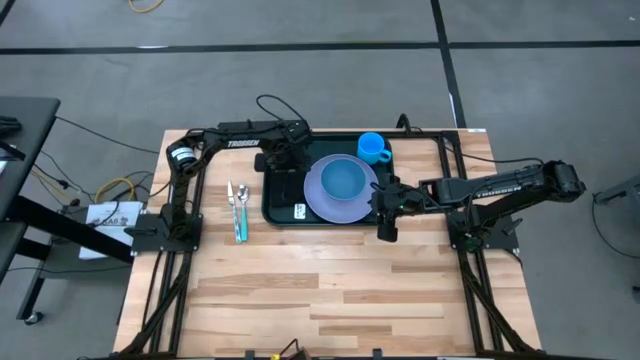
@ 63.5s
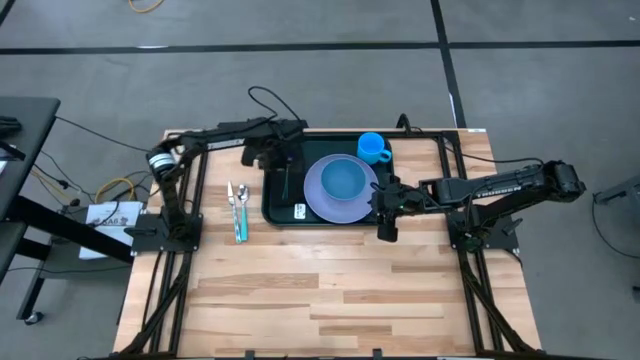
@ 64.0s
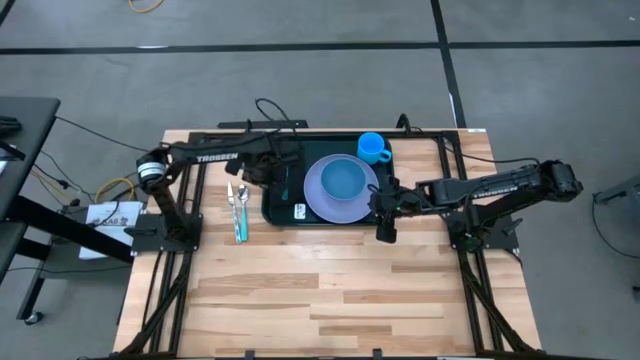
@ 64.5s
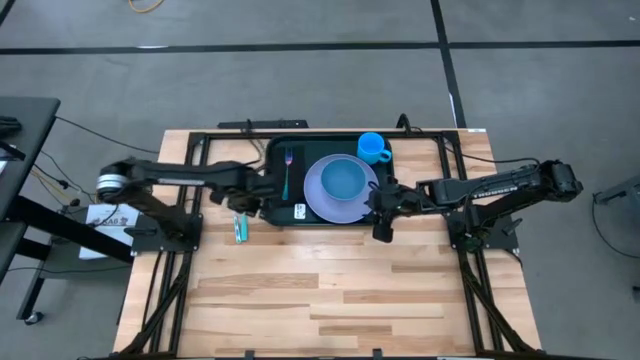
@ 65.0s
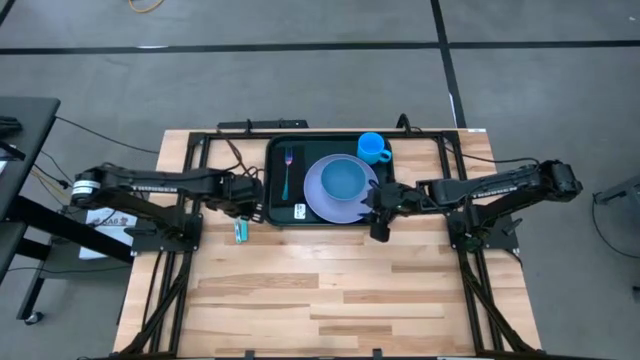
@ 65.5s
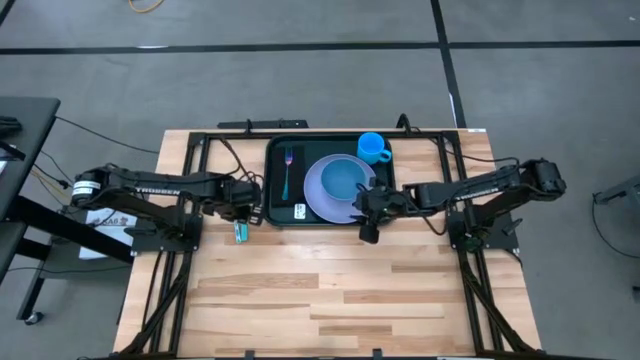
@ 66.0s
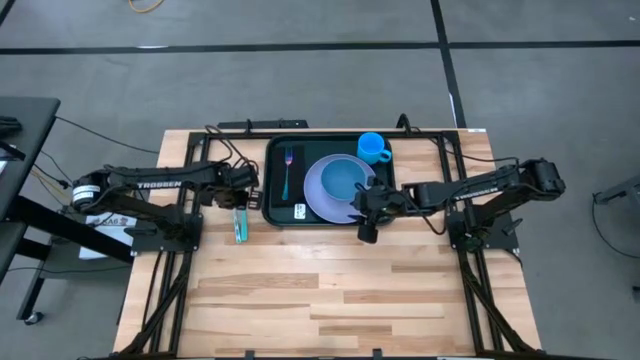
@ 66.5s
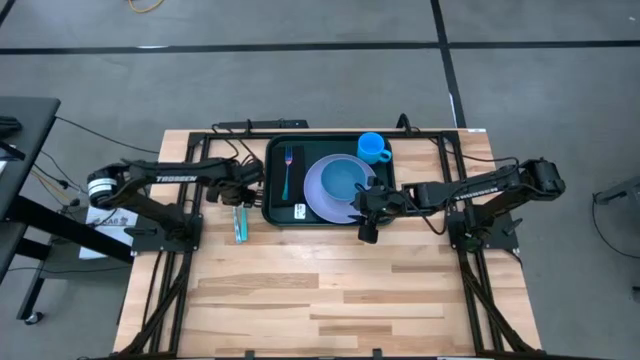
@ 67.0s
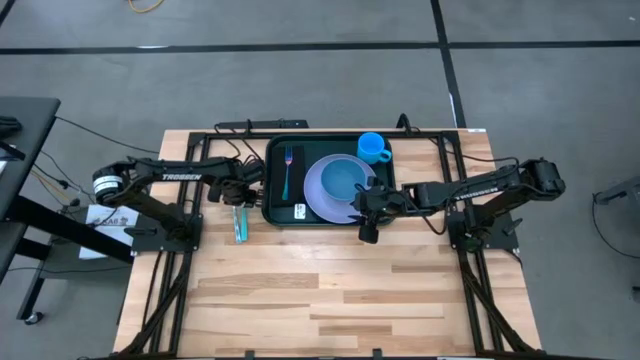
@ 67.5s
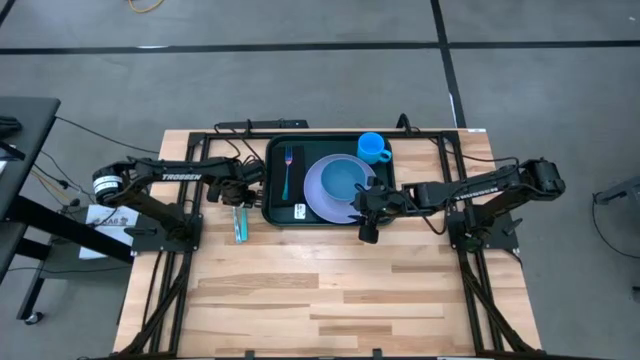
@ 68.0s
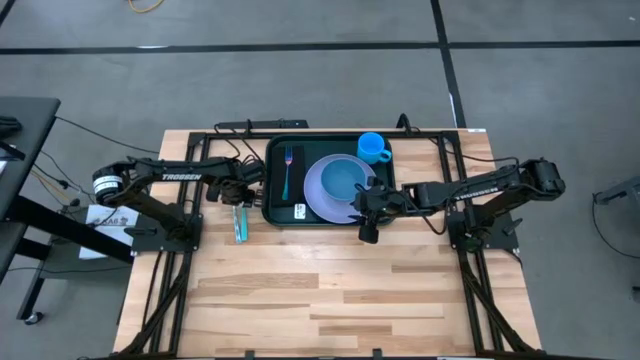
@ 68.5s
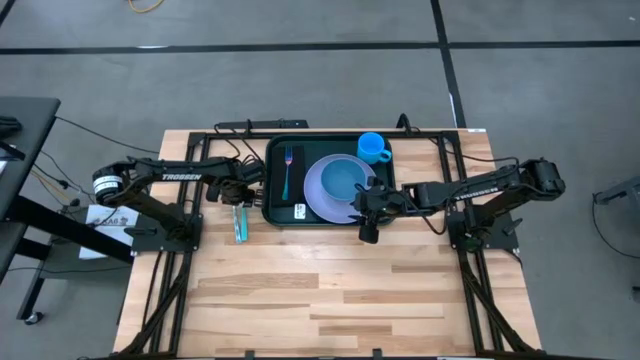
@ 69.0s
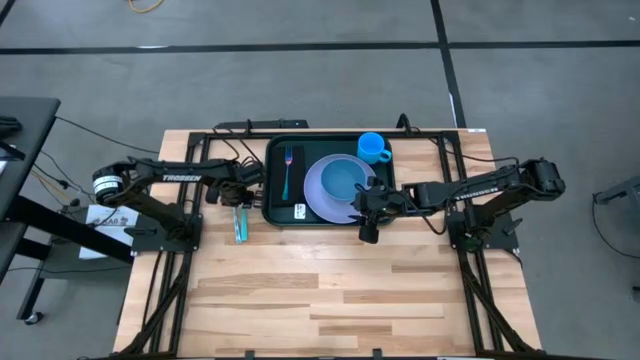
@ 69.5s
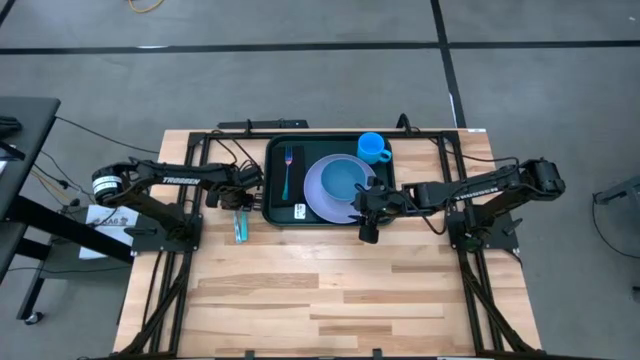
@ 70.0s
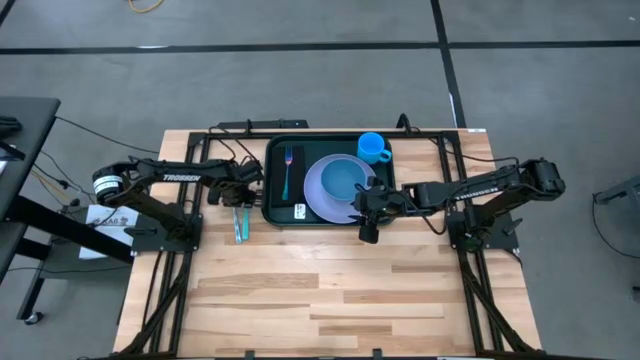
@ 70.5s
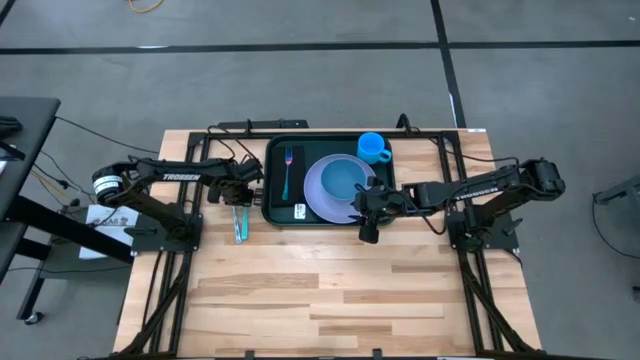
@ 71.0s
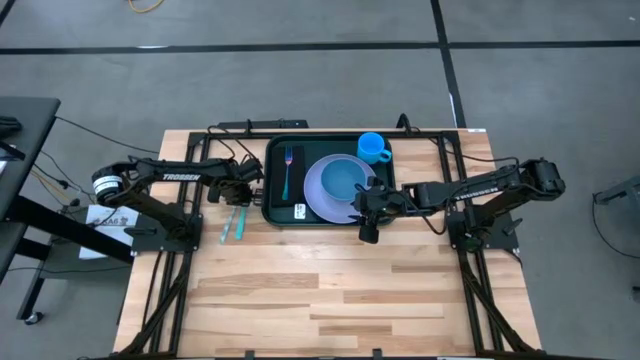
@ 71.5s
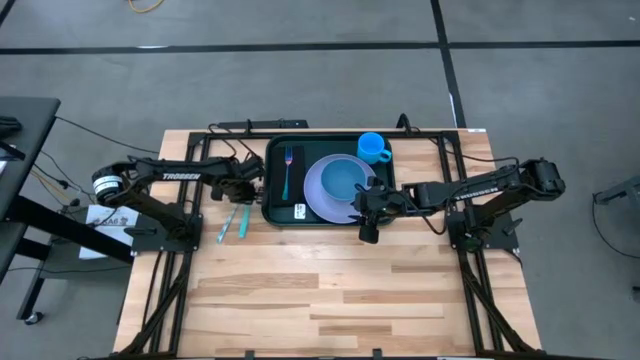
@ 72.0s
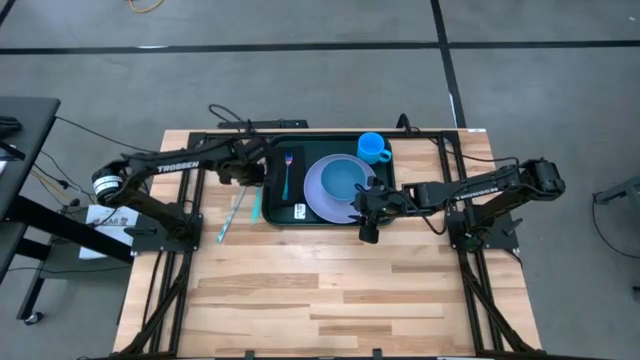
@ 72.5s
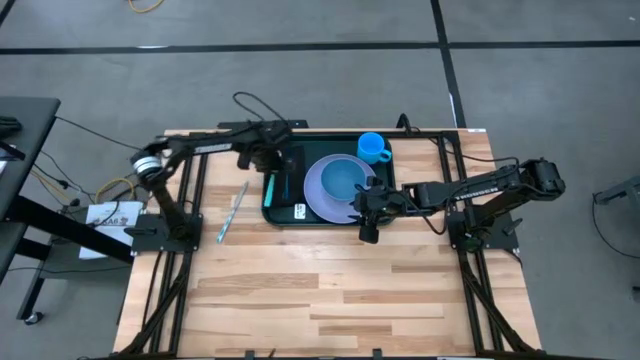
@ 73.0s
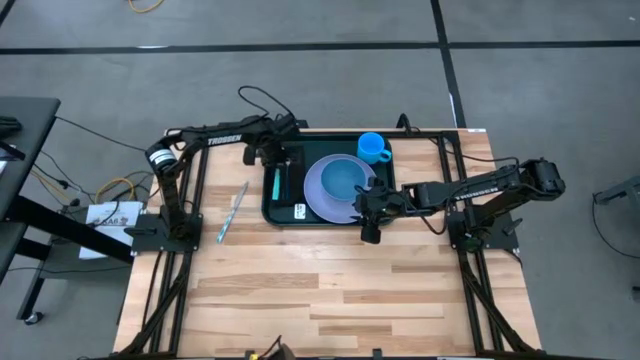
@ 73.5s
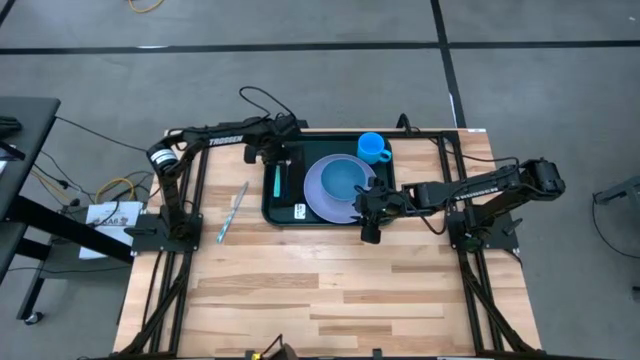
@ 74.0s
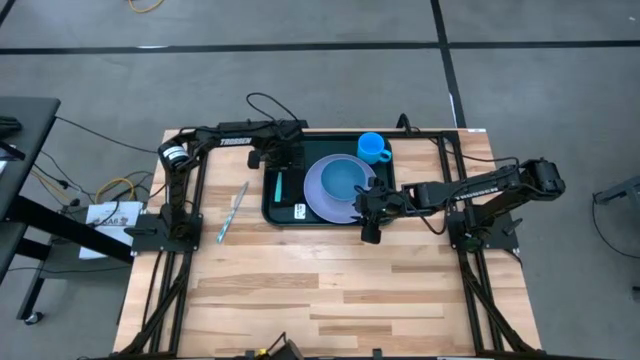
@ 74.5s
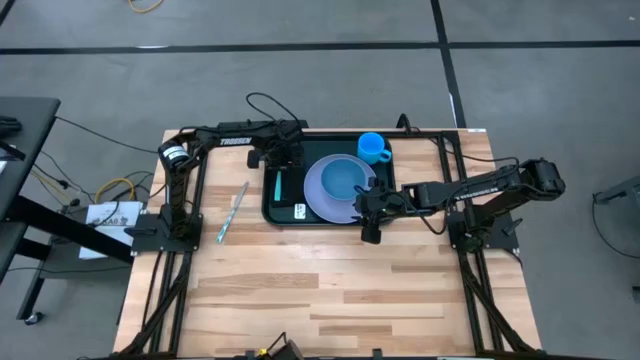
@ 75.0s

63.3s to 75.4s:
Task: Set up tray
Put the green spoon on top of the black napkin to the left side of the violet fork

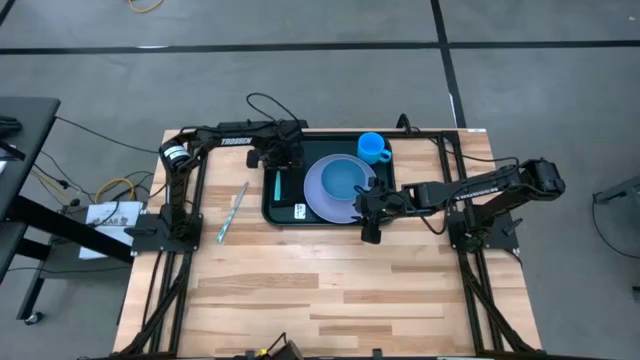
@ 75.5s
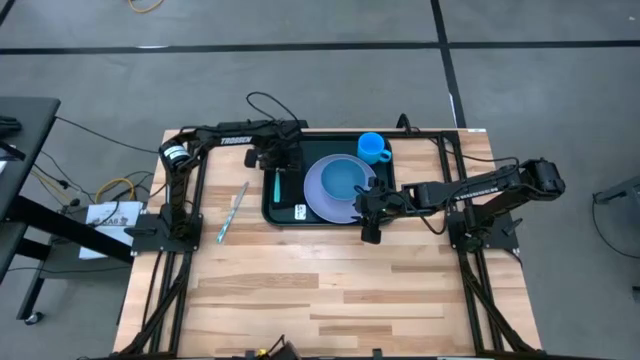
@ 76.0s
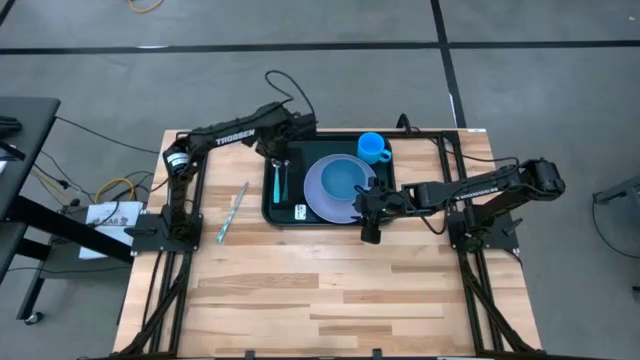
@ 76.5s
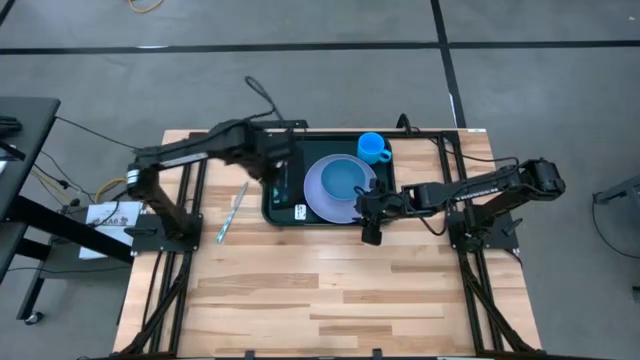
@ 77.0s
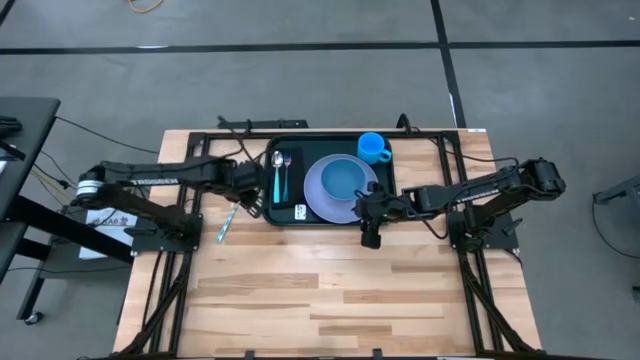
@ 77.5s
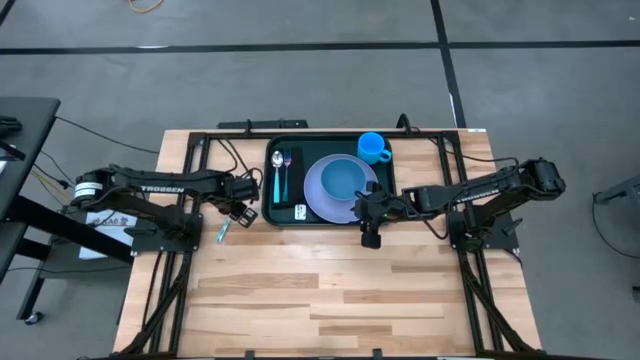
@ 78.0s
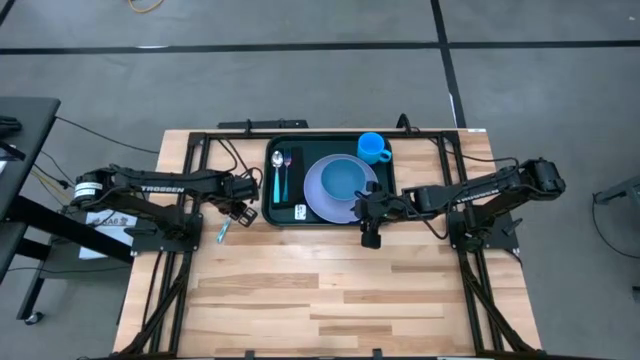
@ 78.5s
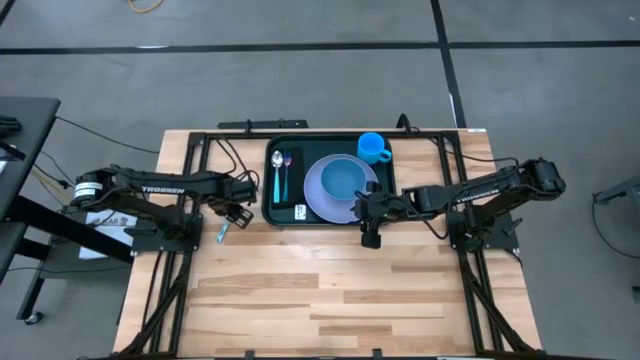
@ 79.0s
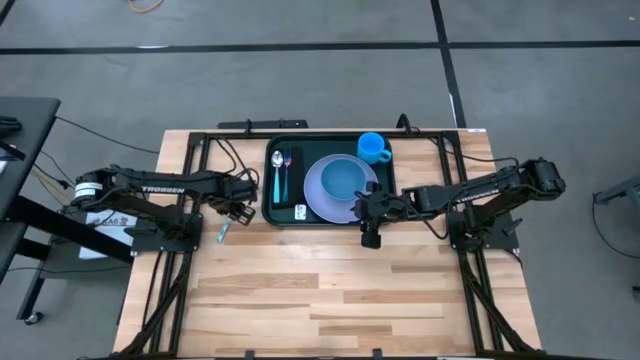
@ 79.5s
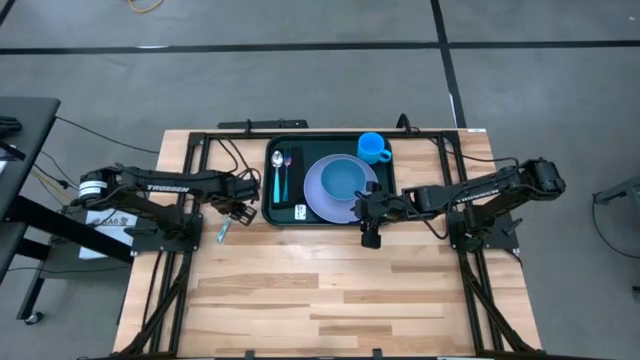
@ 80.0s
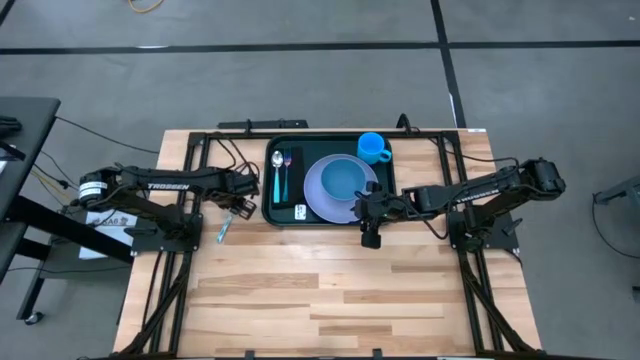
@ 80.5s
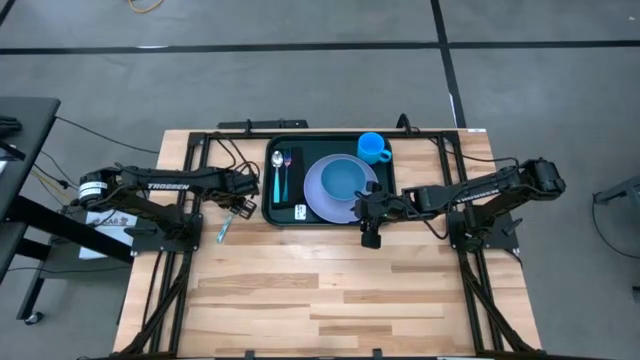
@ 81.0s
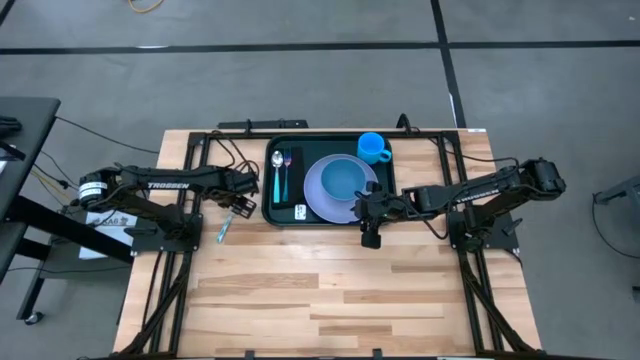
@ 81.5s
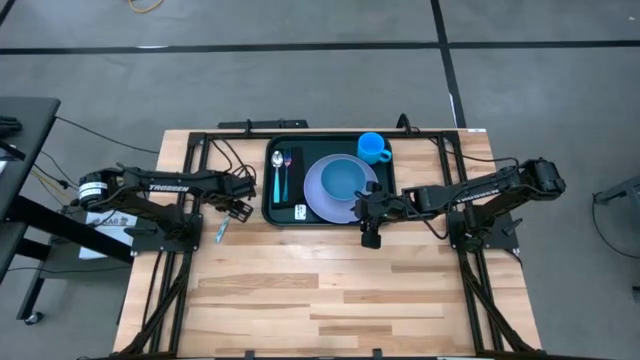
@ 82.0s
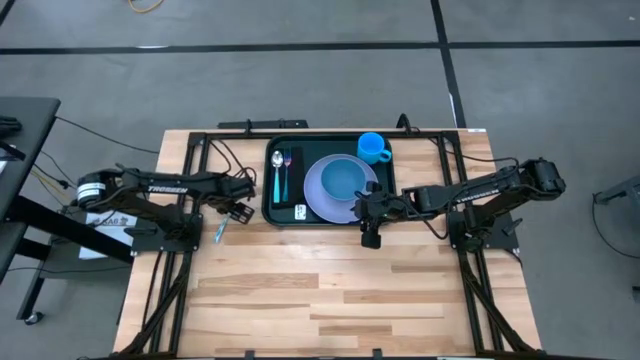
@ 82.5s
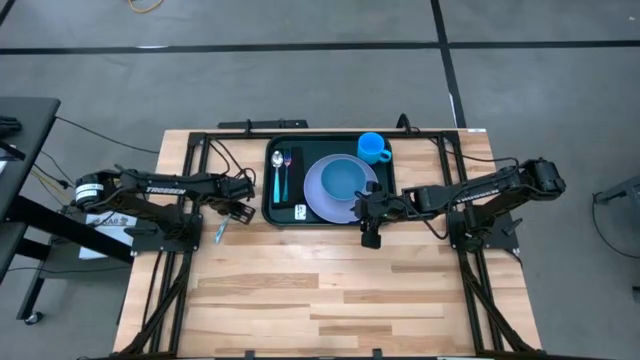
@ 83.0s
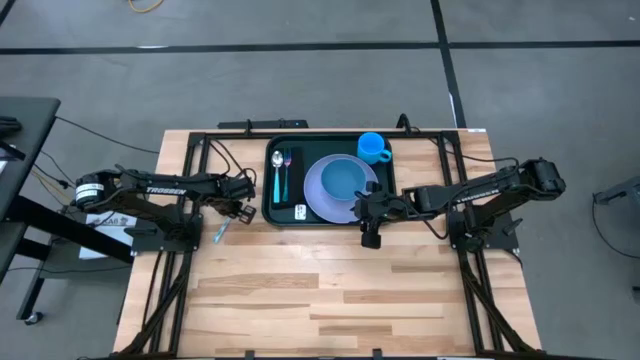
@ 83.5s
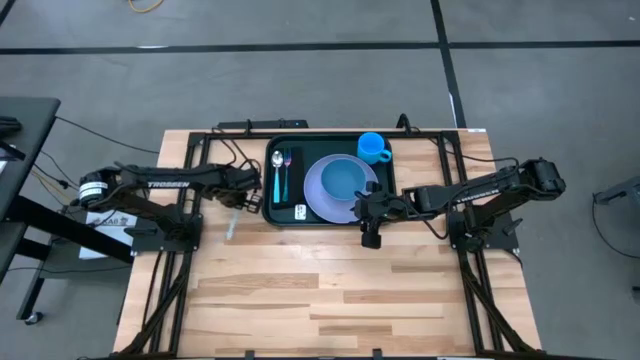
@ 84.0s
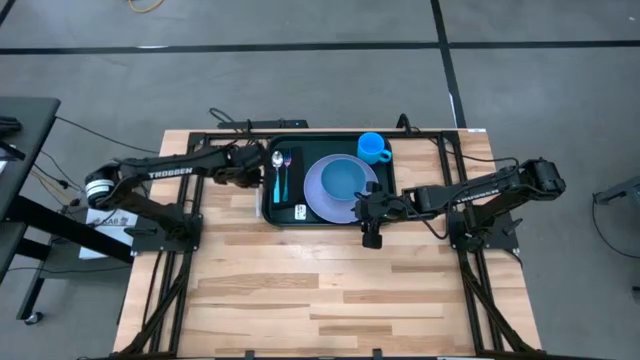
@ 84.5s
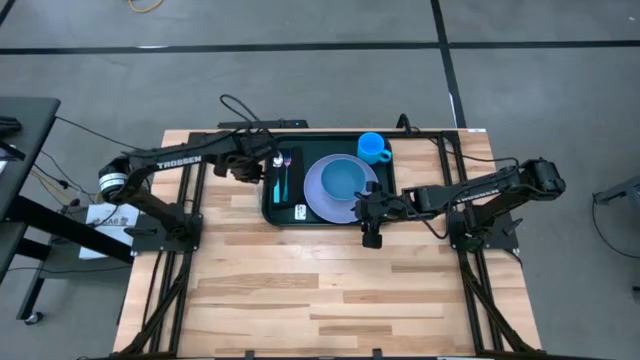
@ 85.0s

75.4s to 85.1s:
Put the white-green table knife on top of the black table napkin to right side of the violet fork
